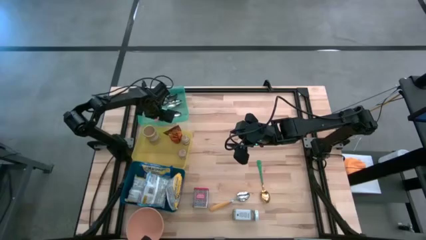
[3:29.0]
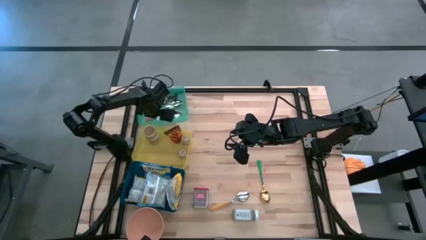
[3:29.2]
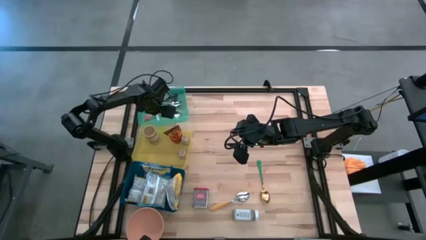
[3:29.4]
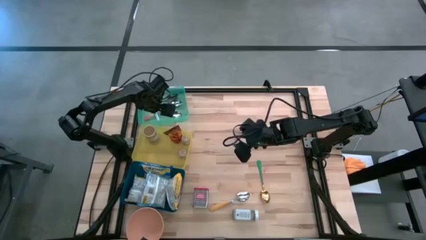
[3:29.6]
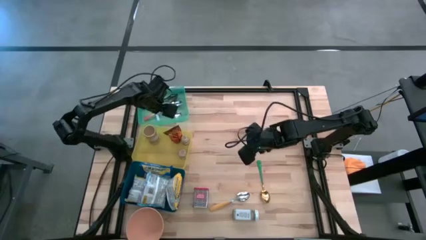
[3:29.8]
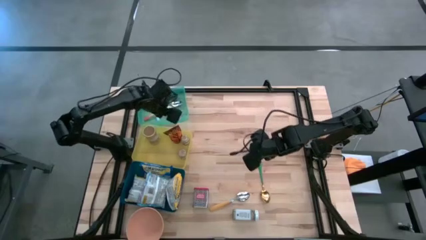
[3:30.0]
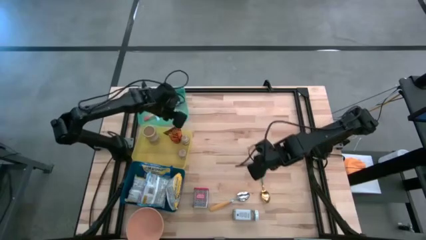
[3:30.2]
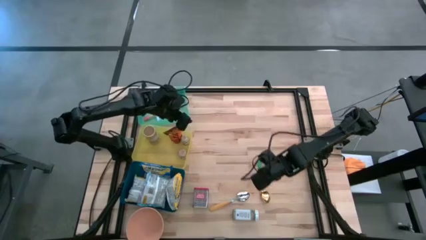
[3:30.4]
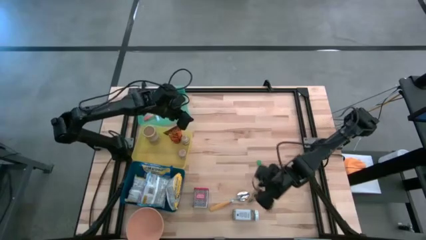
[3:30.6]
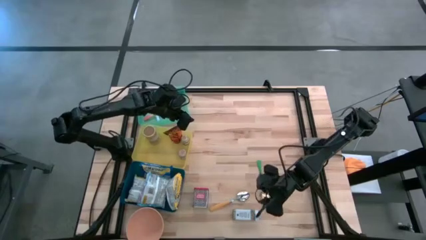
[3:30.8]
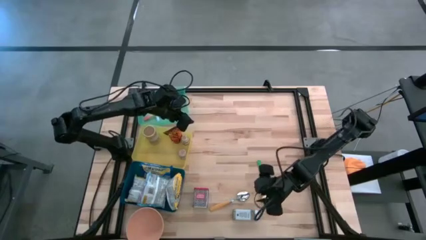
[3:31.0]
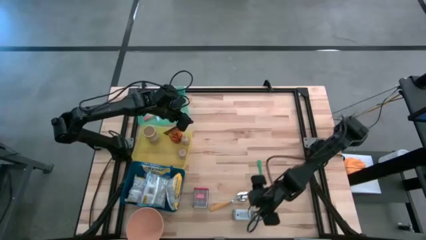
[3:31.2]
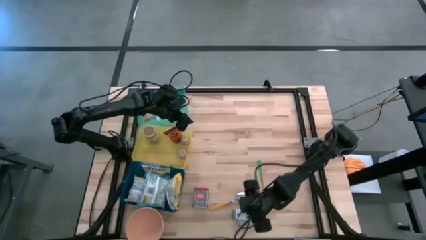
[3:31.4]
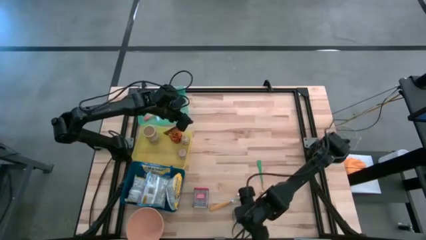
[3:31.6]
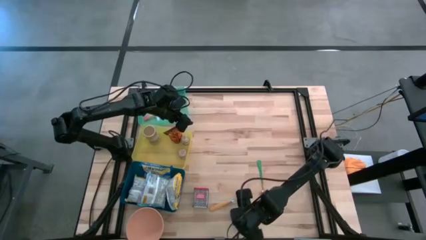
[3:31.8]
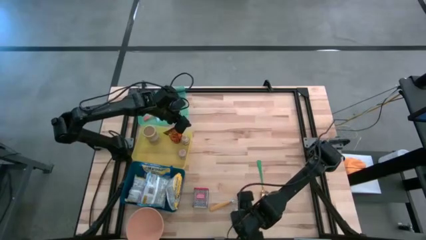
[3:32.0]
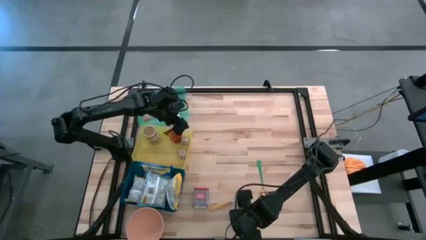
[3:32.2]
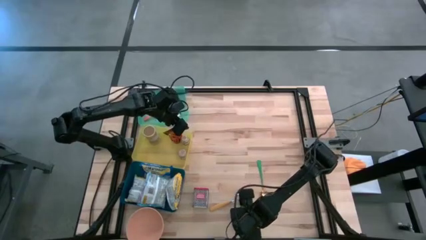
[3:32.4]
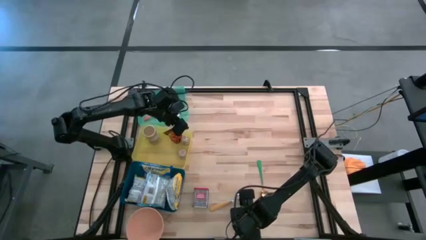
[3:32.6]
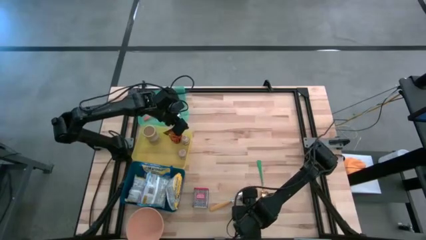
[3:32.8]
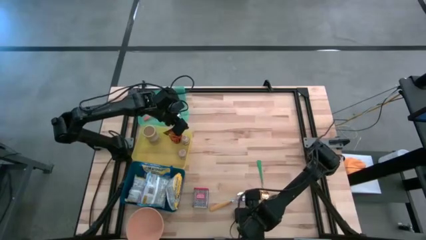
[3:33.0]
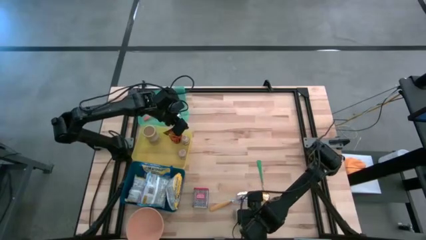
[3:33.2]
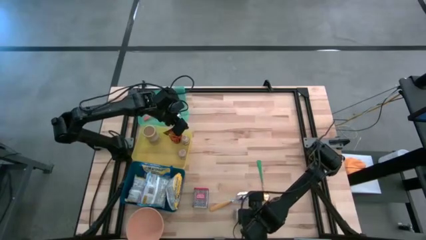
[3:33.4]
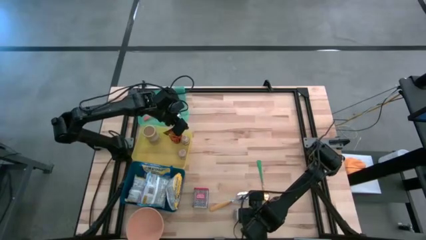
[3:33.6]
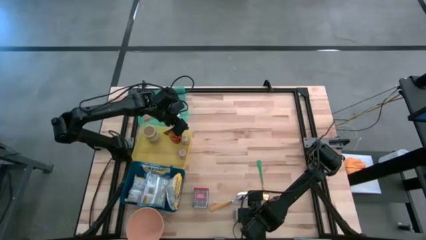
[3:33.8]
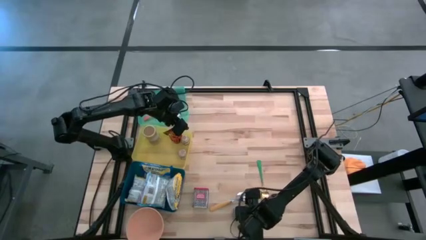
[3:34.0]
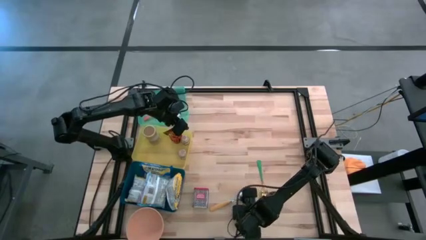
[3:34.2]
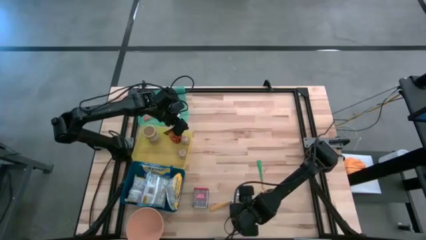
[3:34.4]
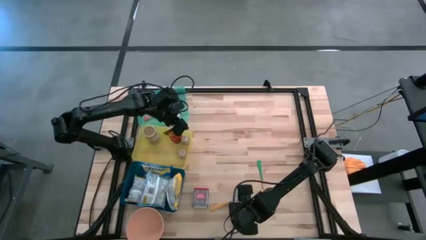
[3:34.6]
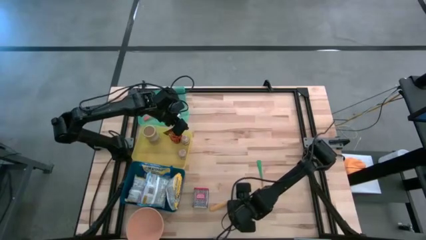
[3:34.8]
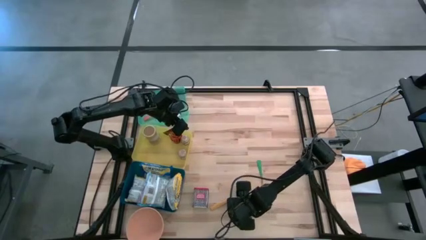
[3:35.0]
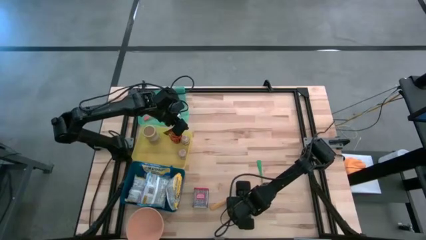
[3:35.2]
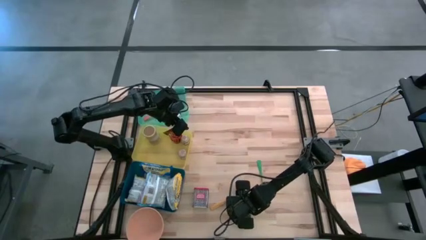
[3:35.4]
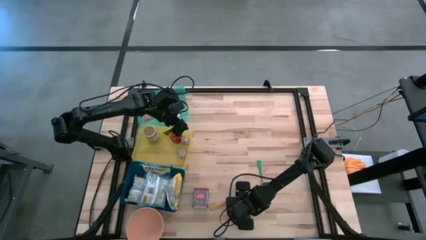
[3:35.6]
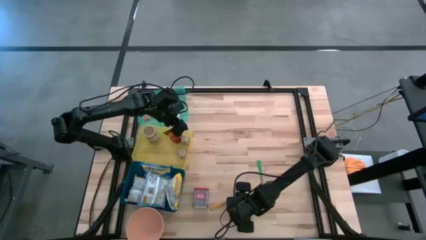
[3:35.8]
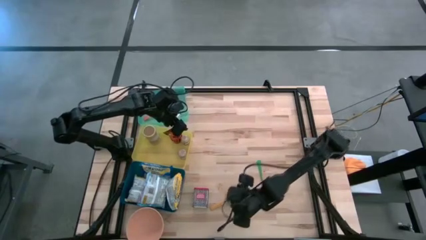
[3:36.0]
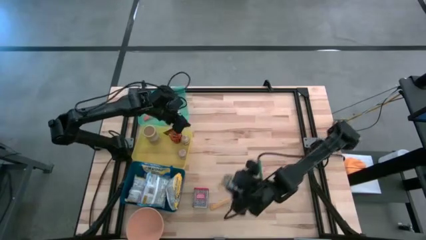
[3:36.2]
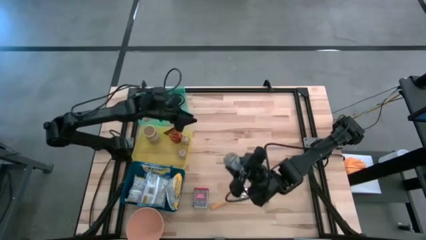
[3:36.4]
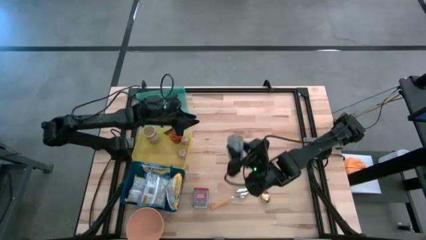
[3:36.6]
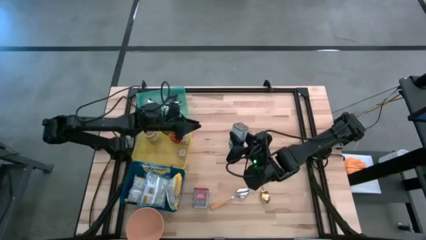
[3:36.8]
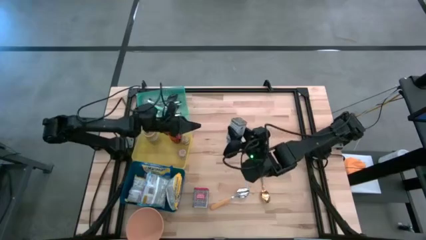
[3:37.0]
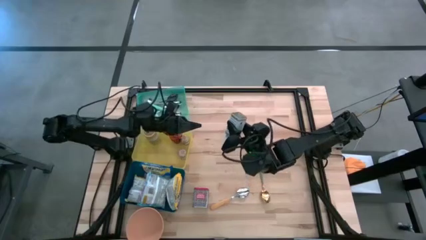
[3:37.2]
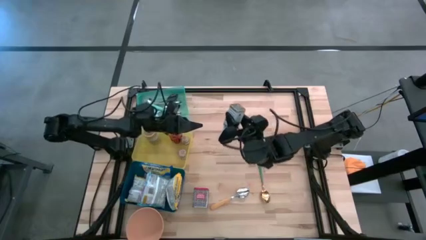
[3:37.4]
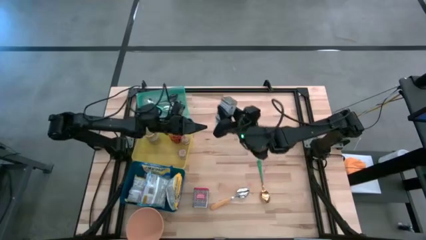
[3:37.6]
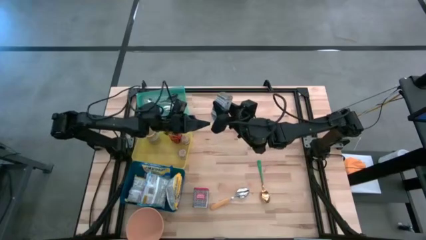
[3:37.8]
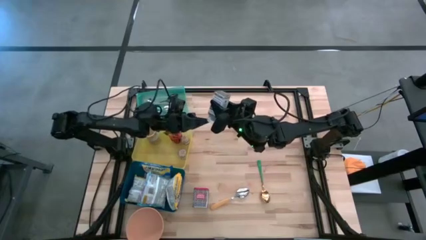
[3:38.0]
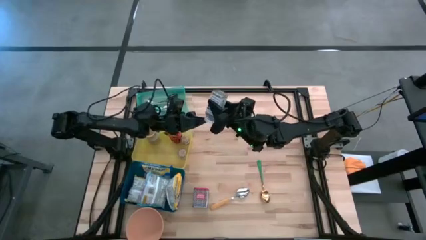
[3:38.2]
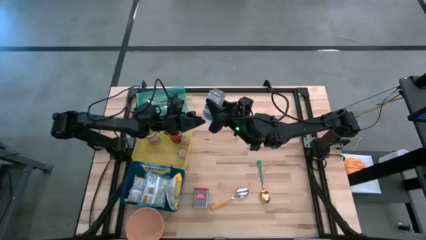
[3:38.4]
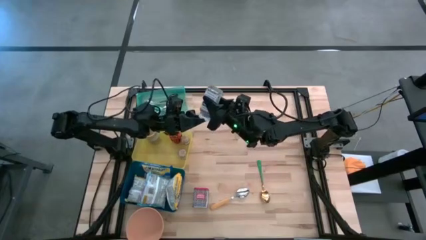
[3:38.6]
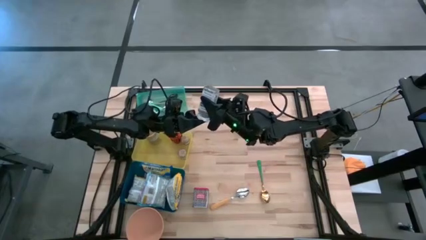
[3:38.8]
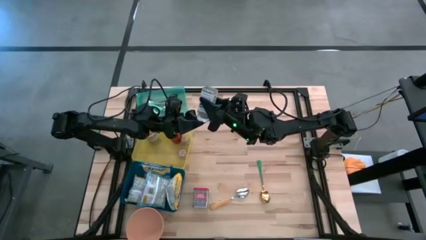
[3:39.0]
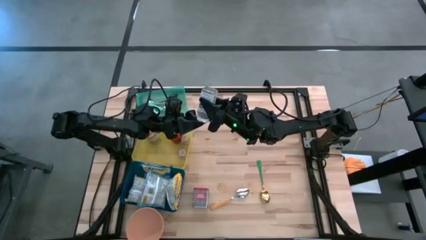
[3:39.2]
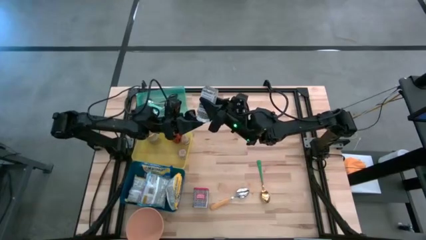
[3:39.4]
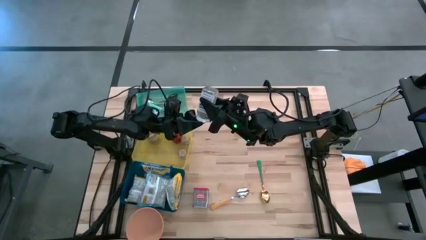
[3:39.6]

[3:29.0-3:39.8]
Put the white seasoning bottle into the yellow bin
